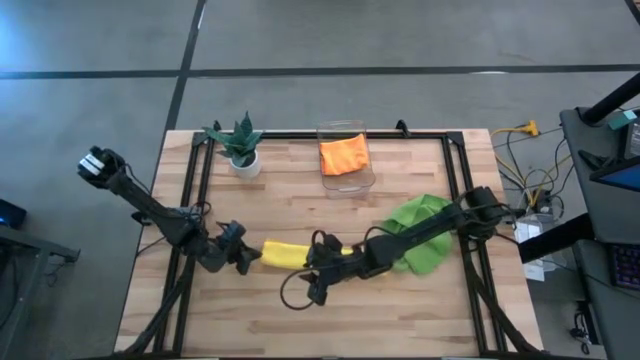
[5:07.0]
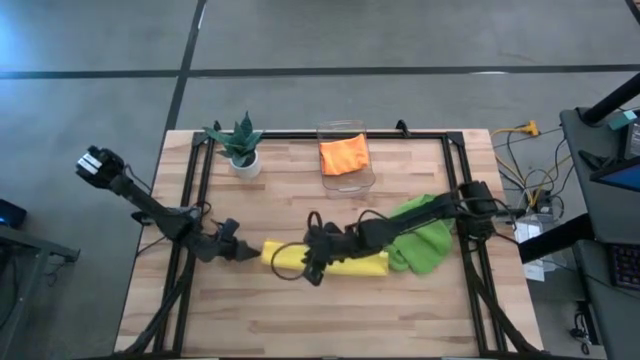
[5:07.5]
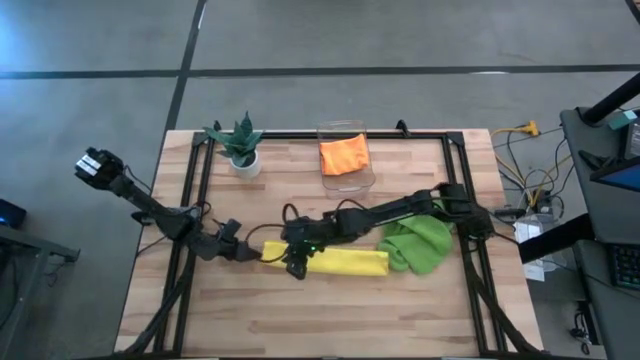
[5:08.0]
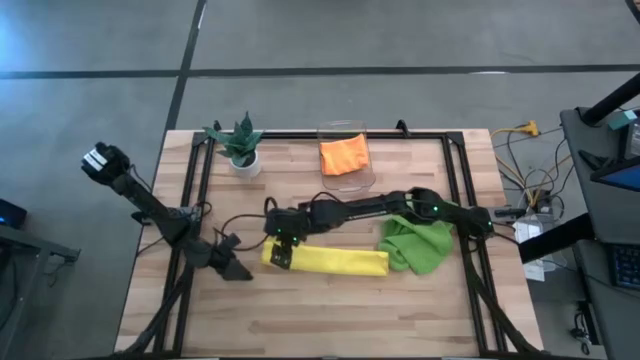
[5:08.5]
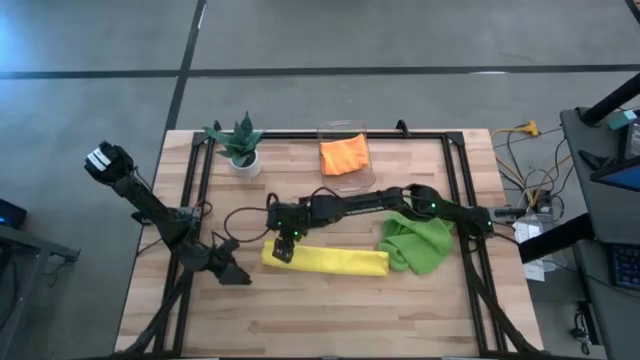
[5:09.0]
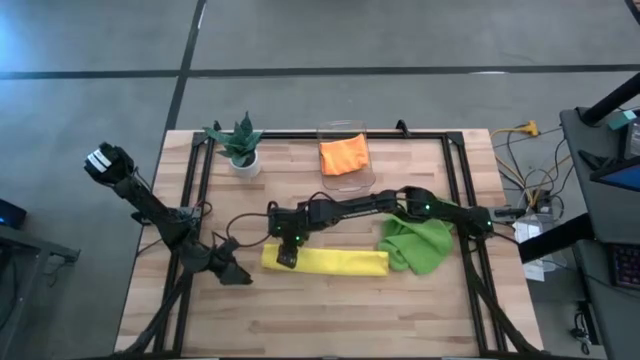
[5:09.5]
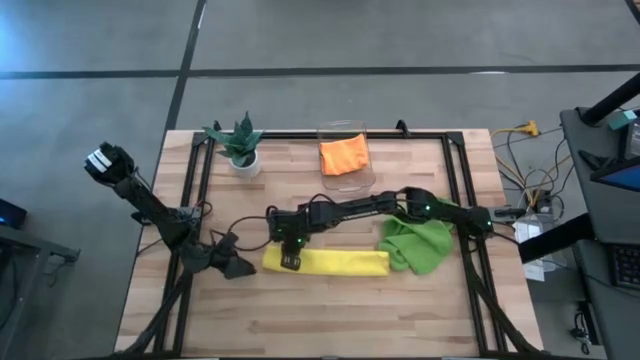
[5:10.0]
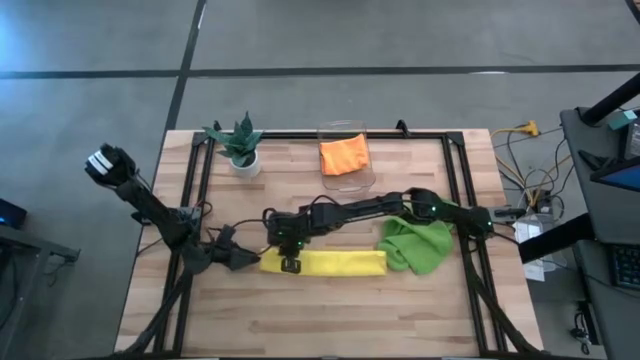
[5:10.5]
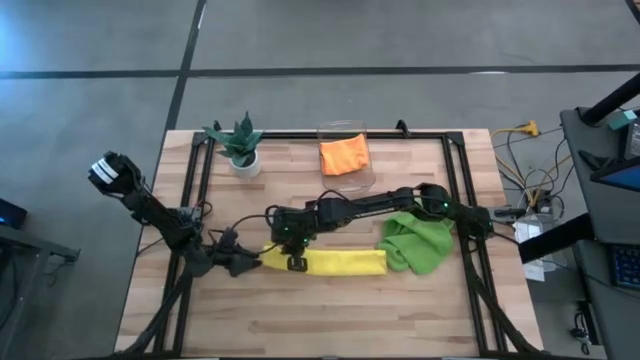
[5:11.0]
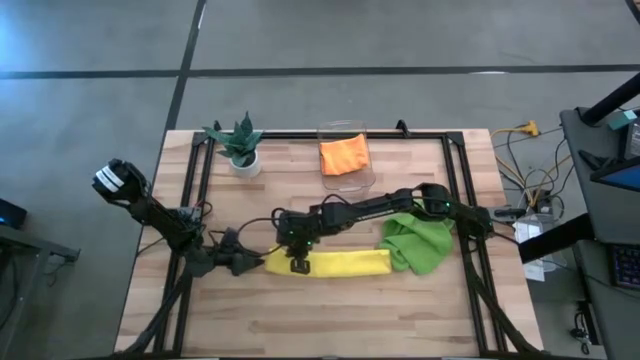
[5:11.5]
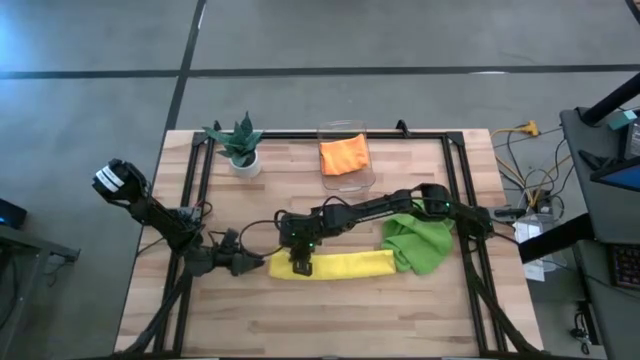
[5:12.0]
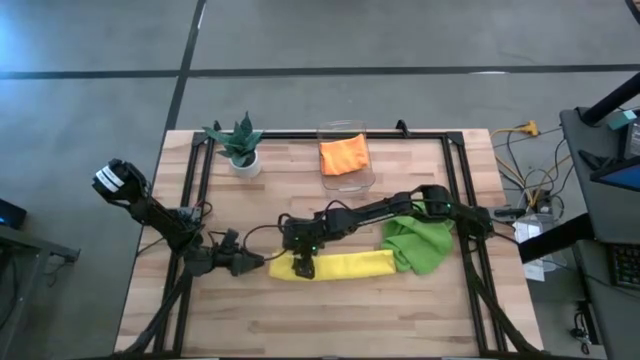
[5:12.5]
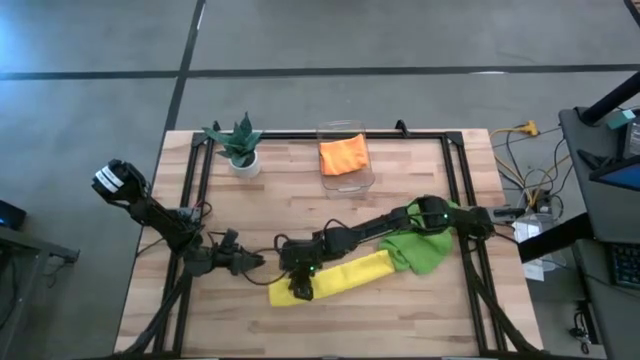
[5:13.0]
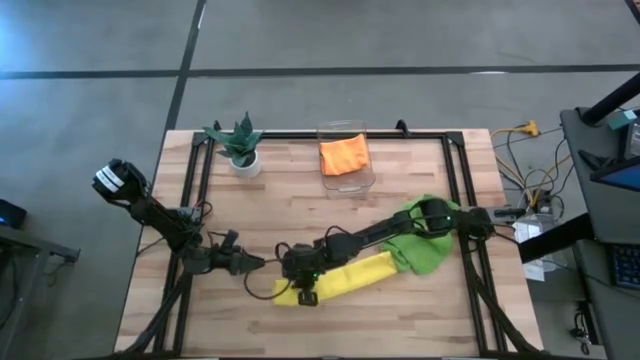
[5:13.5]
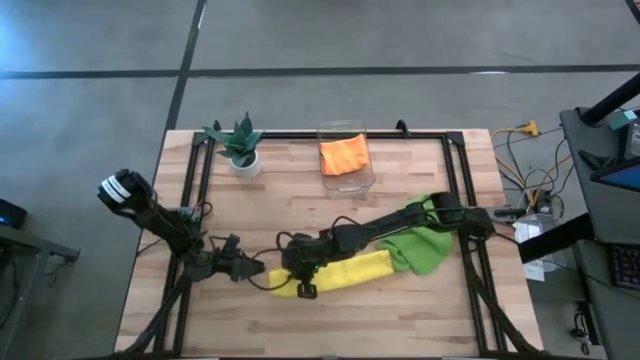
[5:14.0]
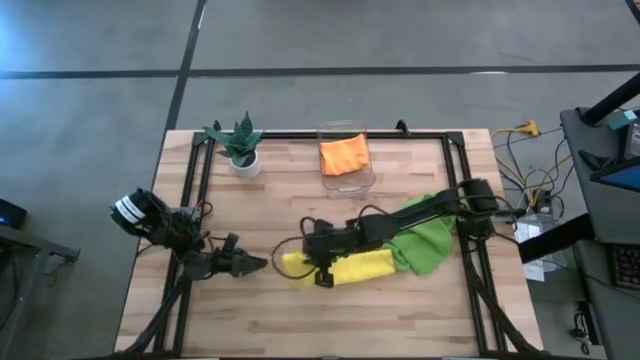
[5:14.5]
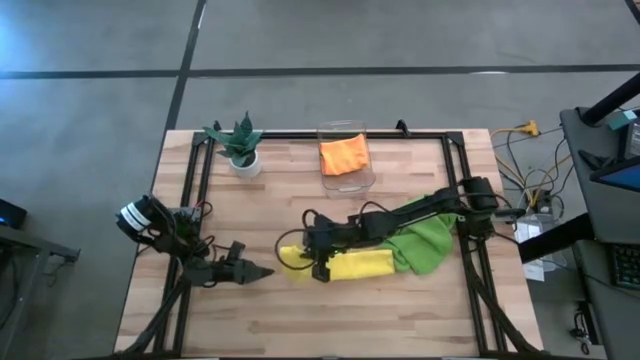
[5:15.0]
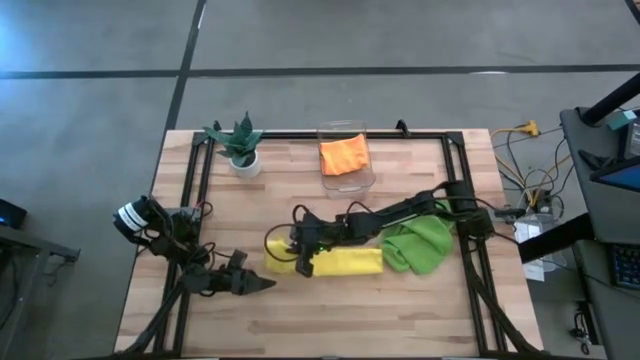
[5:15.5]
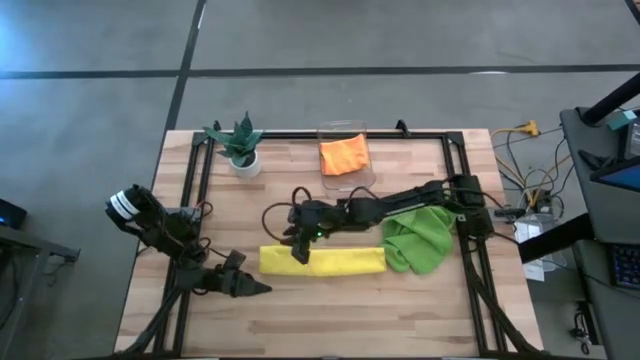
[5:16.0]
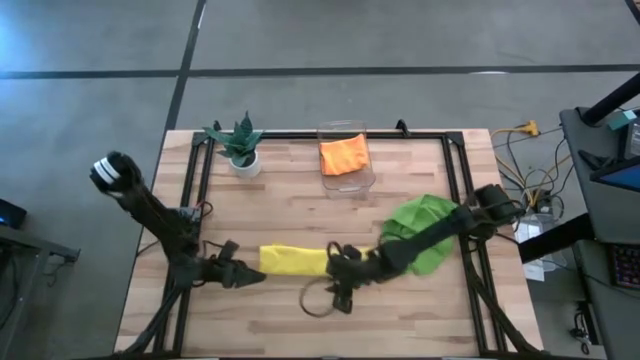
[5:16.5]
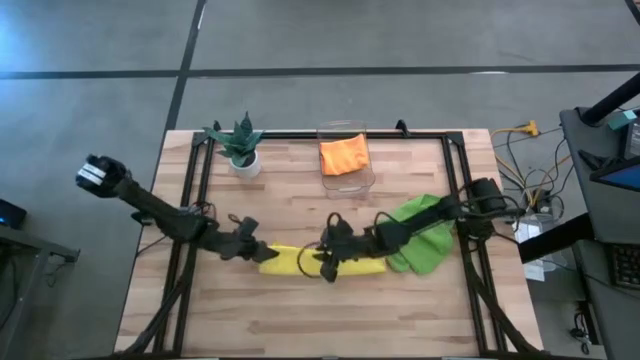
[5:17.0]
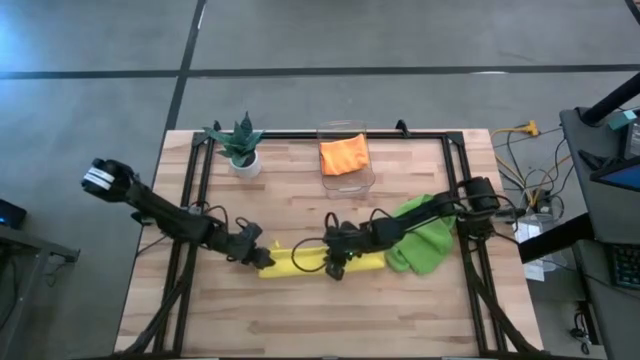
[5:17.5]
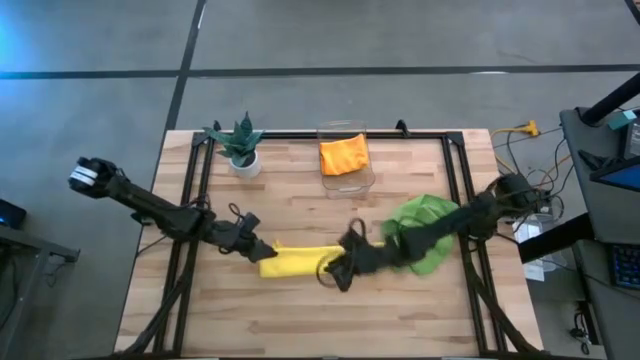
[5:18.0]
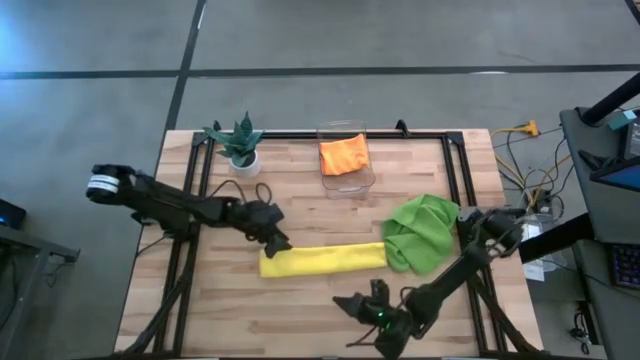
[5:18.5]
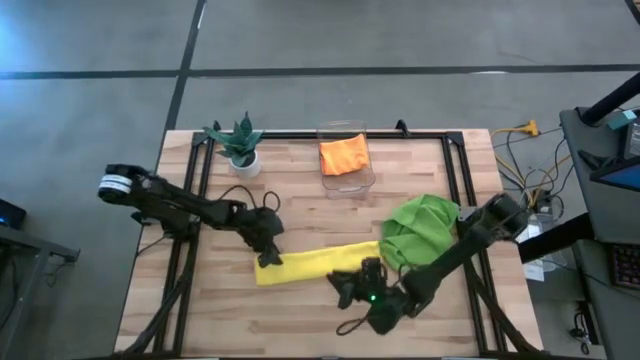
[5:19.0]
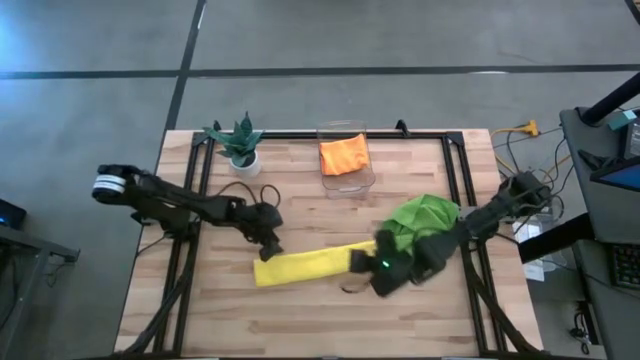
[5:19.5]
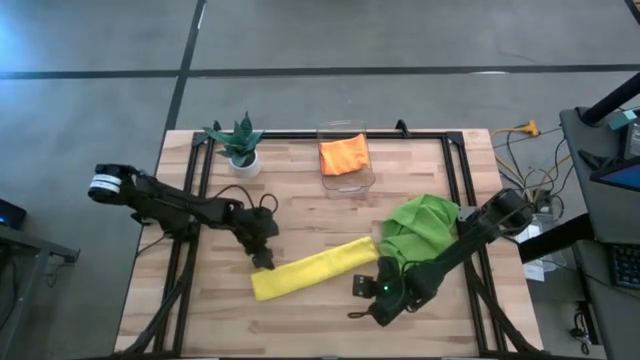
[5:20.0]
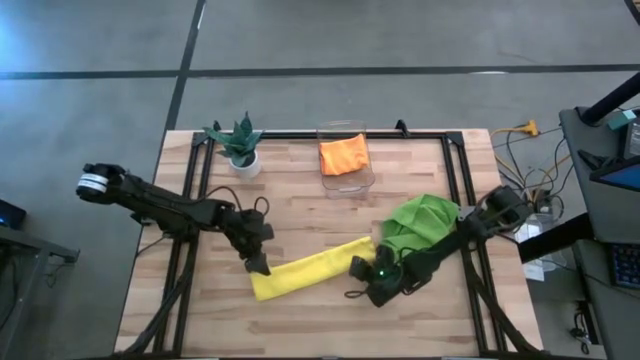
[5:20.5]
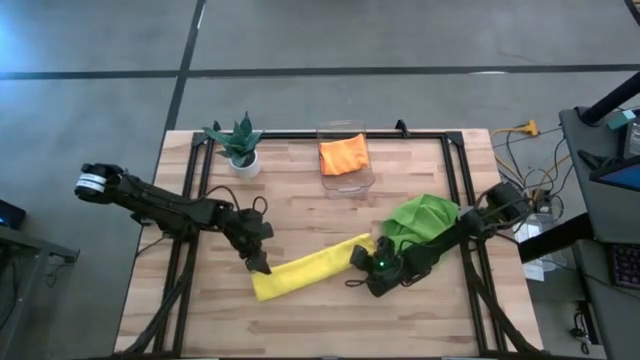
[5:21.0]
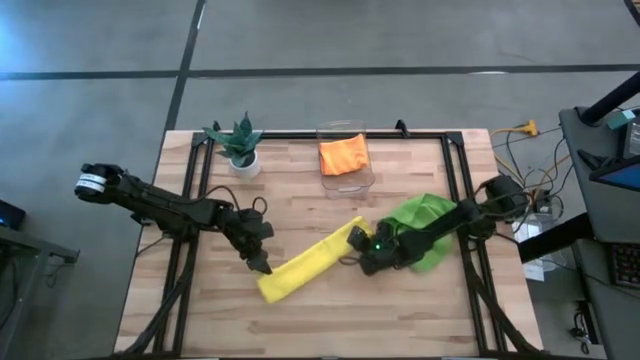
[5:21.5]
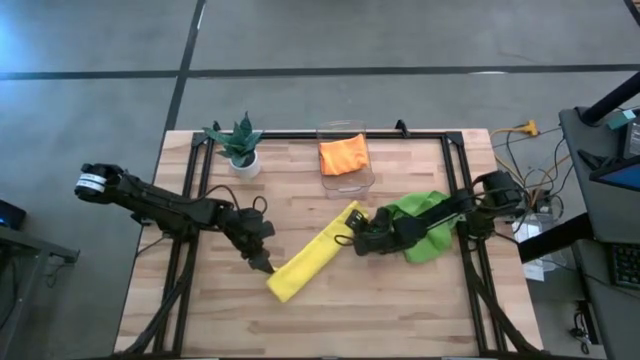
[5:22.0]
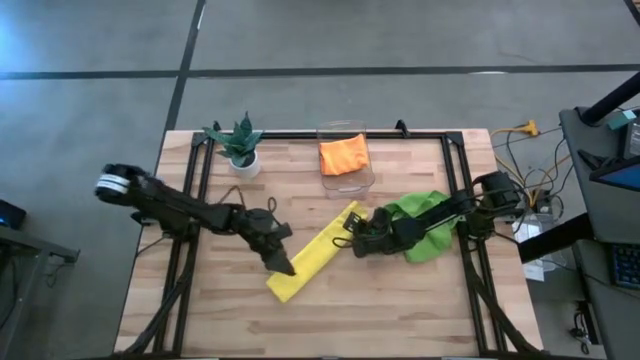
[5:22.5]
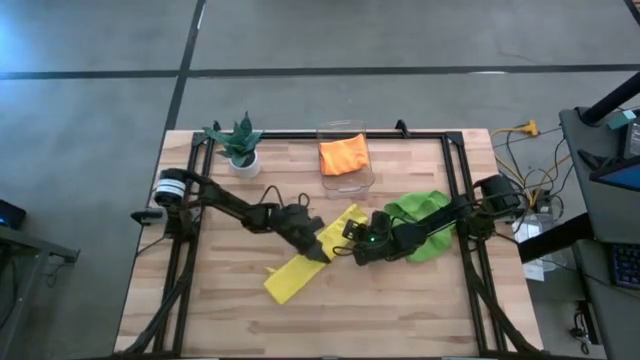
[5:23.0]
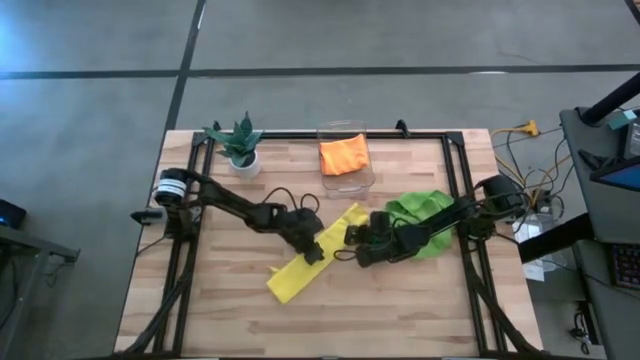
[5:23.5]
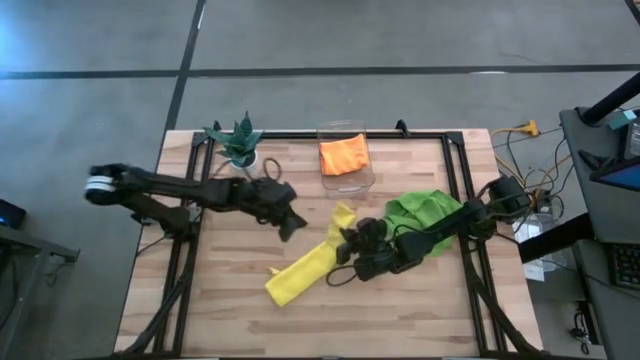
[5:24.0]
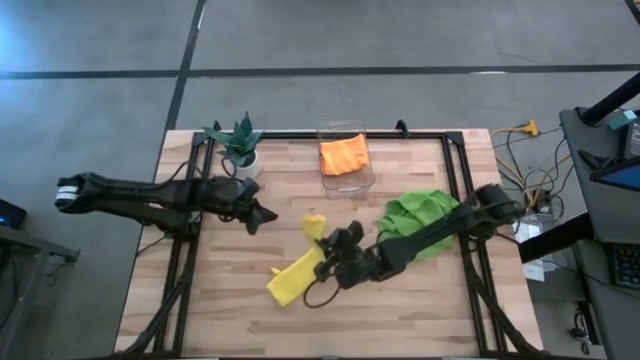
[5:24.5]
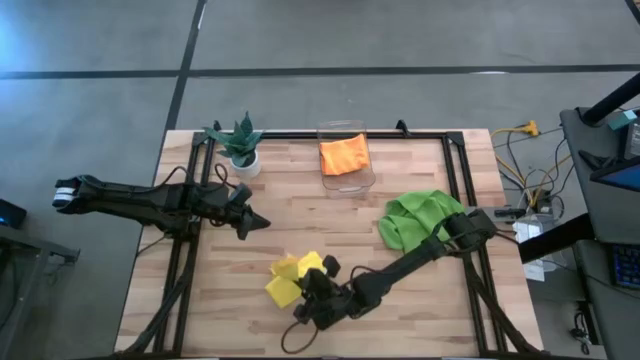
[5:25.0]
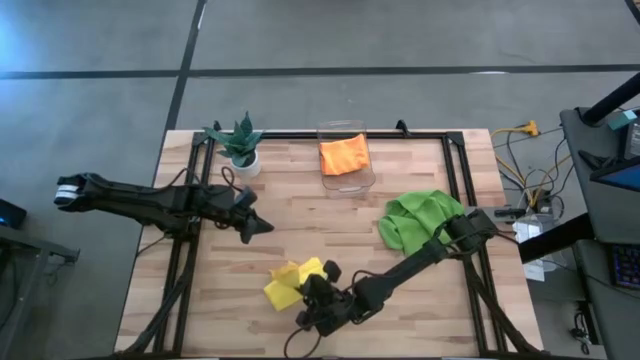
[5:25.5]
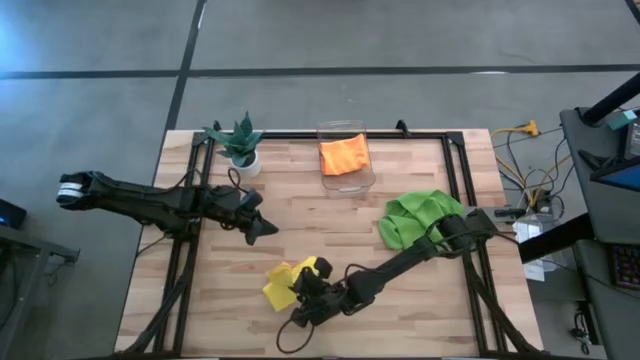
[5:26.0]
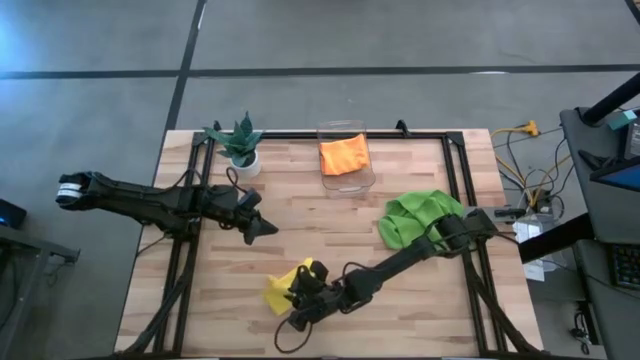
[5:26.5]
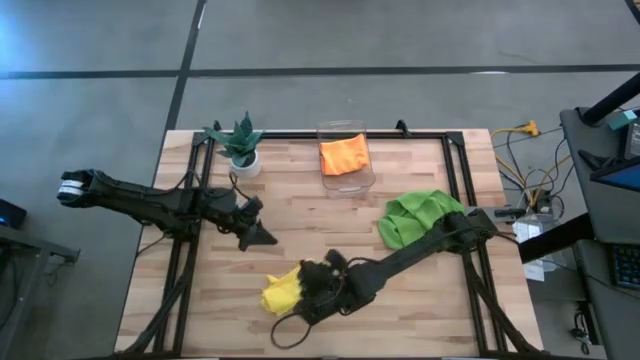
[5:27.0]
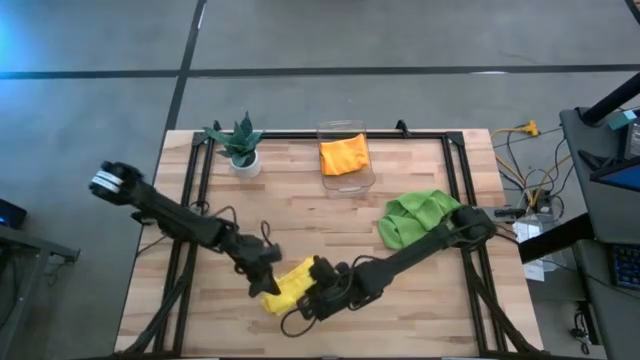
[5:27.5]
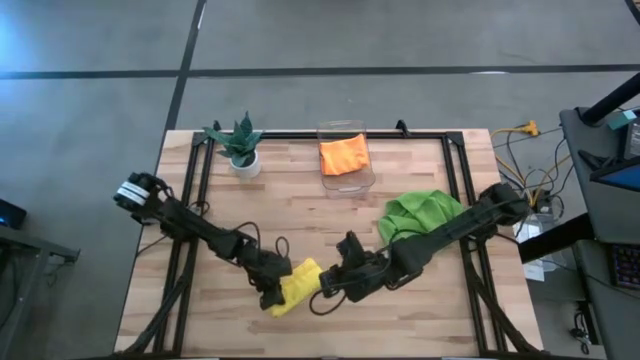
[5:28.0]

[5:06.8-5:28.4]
Task: Fold microfiber towels
Fold the yellow towel
